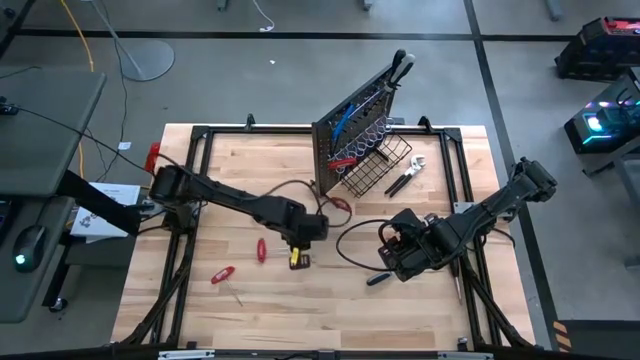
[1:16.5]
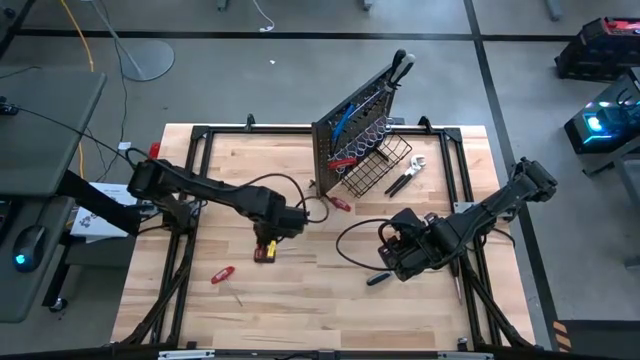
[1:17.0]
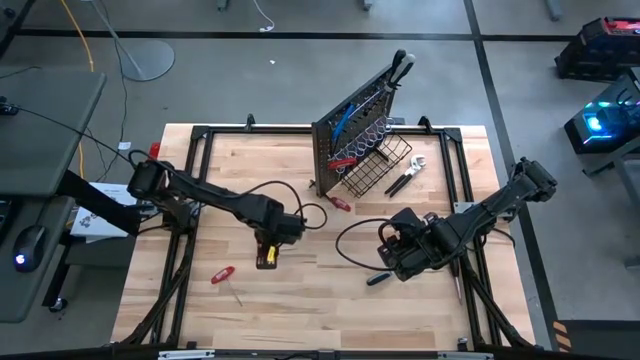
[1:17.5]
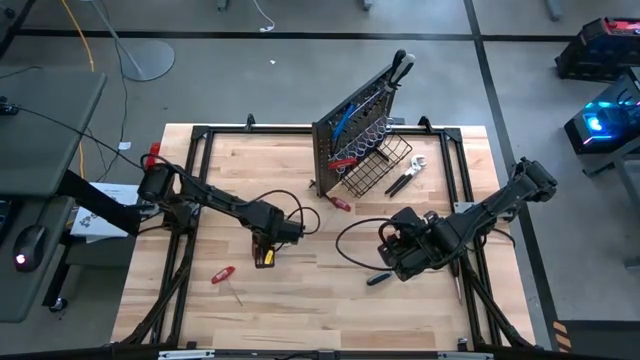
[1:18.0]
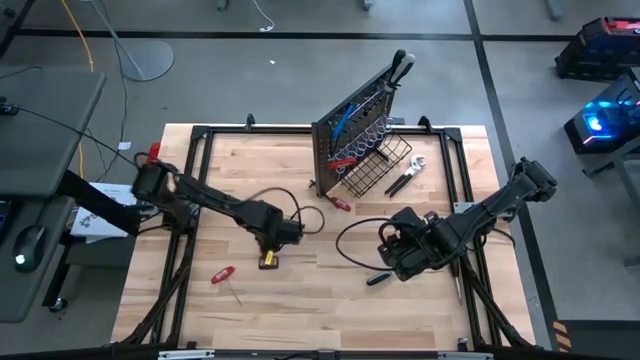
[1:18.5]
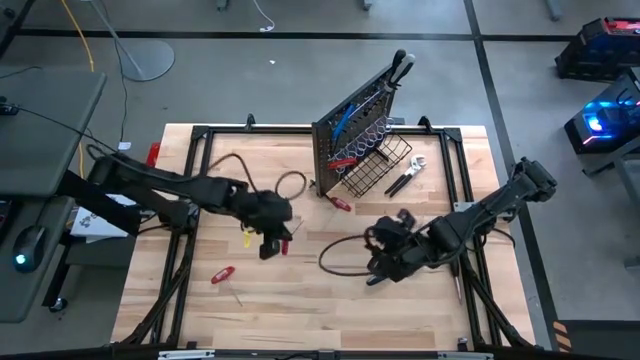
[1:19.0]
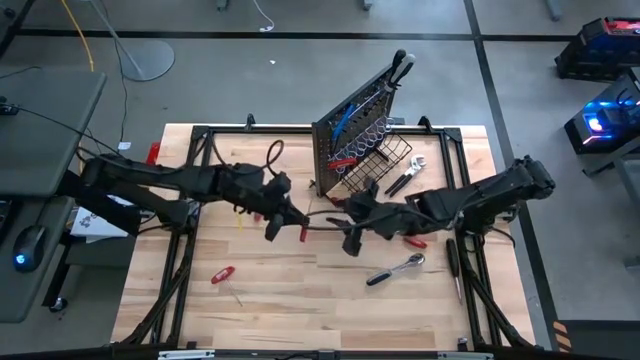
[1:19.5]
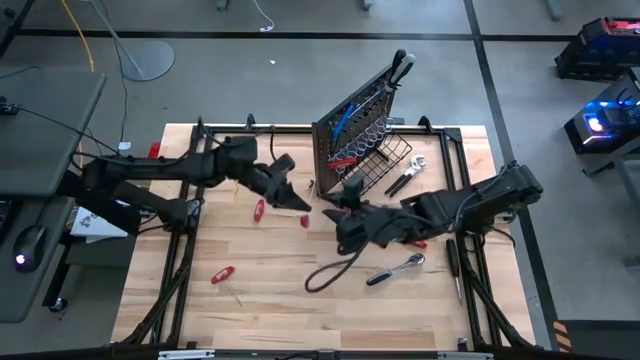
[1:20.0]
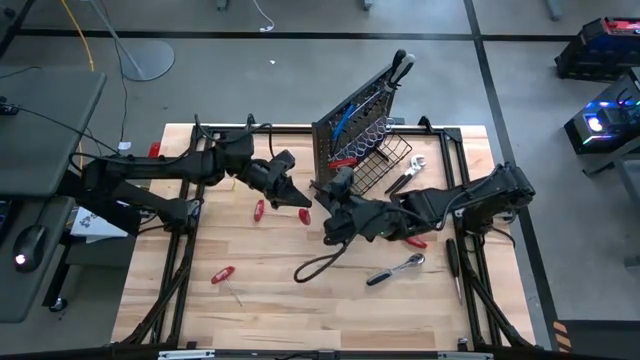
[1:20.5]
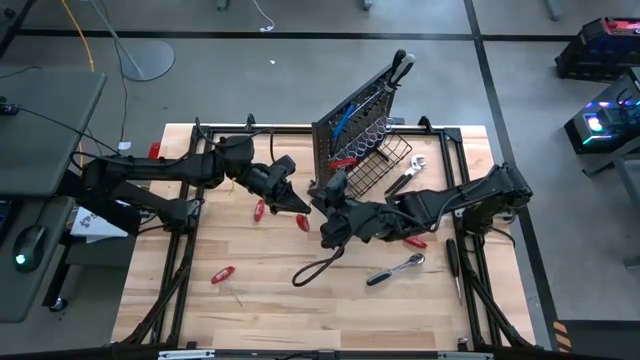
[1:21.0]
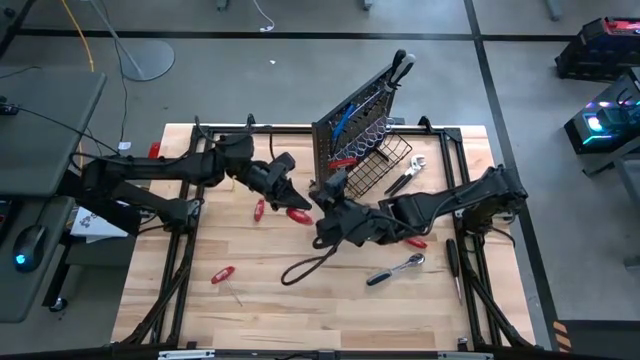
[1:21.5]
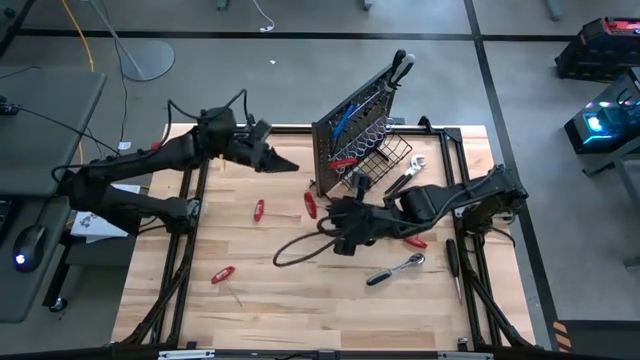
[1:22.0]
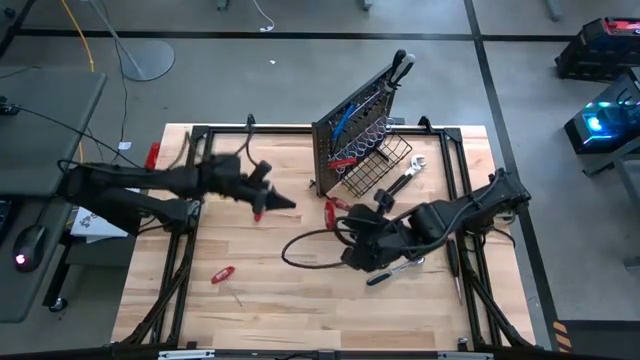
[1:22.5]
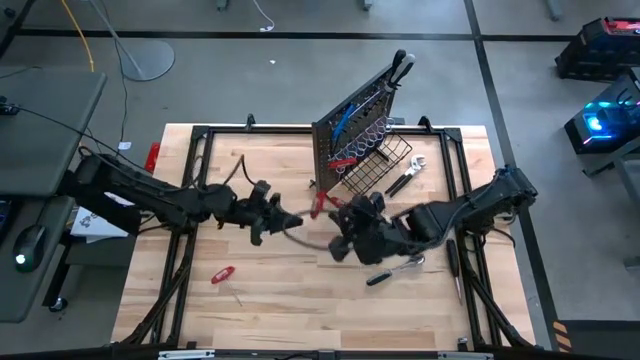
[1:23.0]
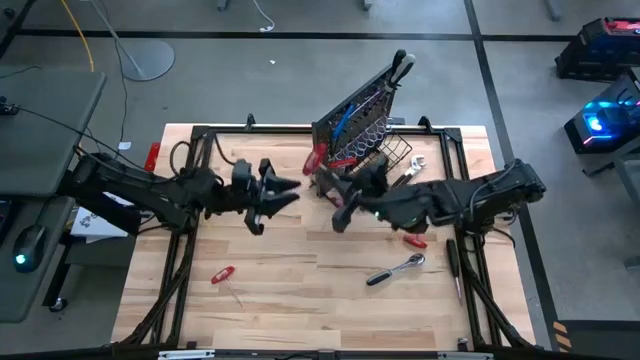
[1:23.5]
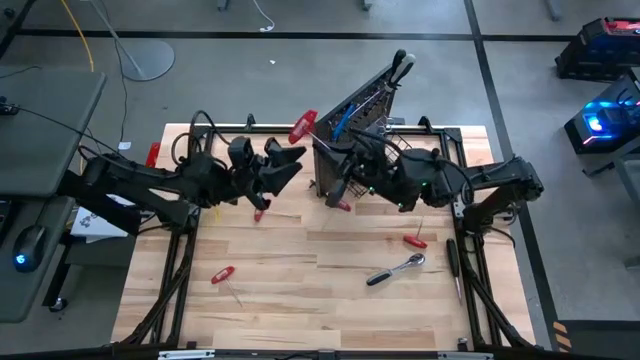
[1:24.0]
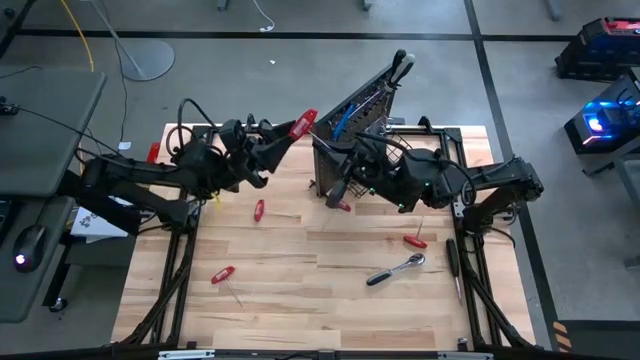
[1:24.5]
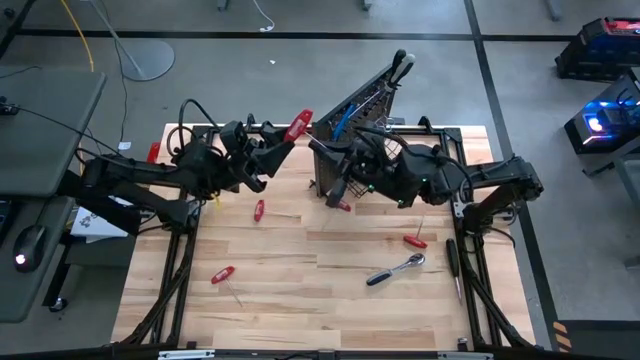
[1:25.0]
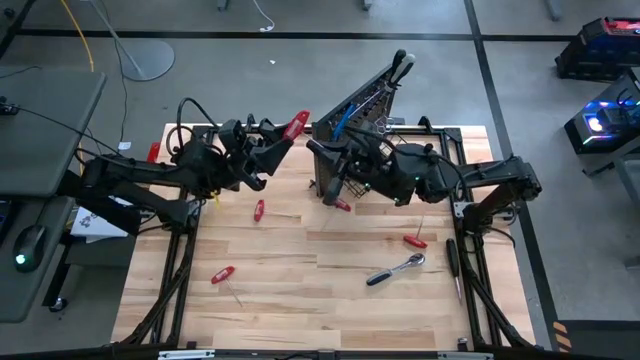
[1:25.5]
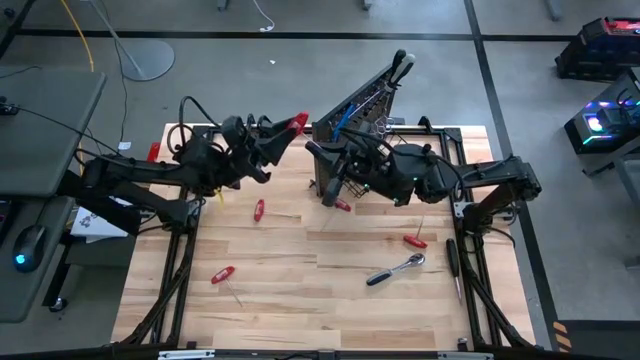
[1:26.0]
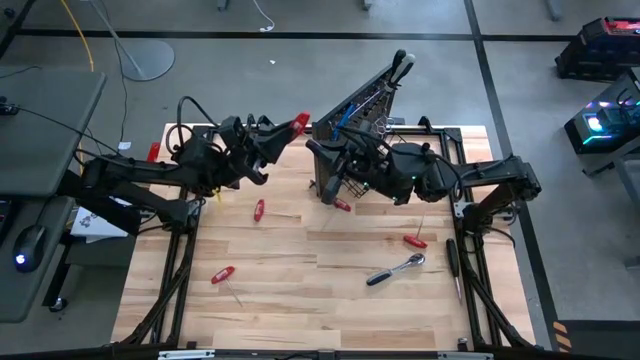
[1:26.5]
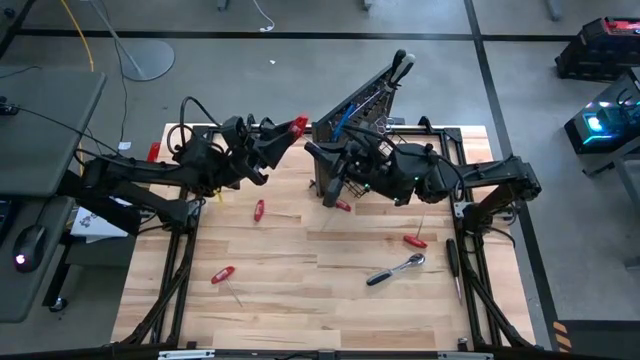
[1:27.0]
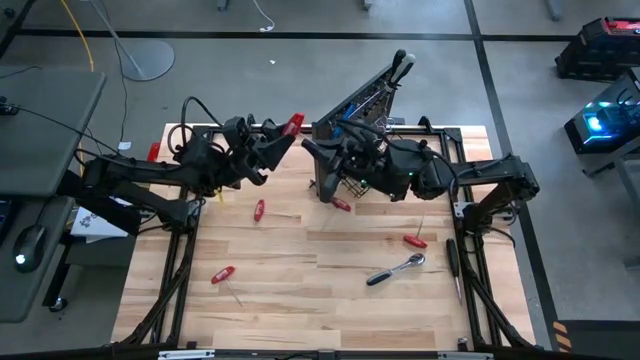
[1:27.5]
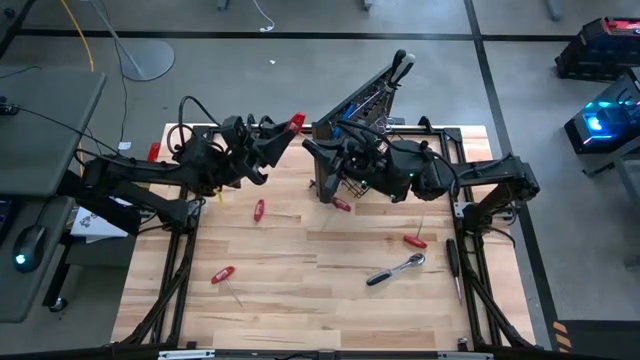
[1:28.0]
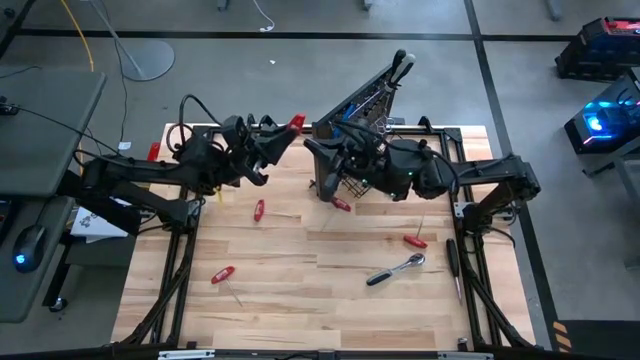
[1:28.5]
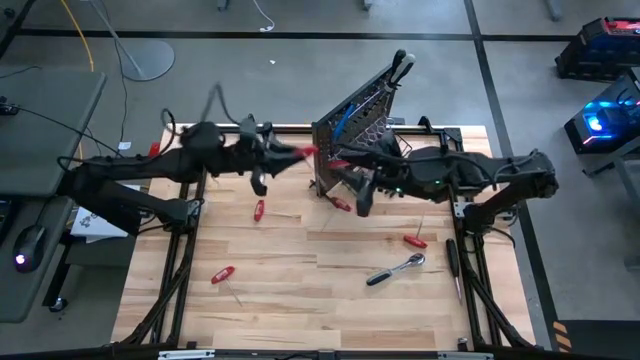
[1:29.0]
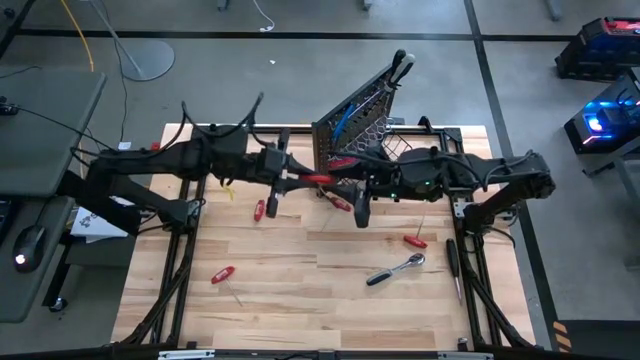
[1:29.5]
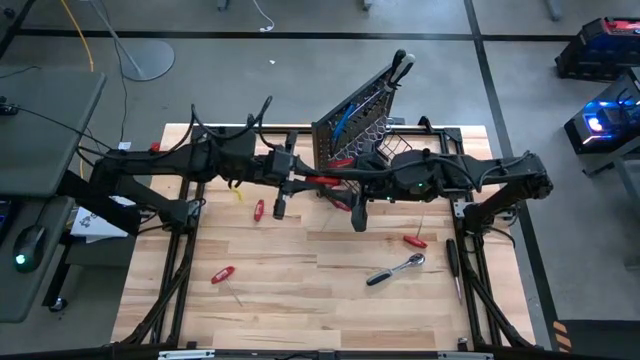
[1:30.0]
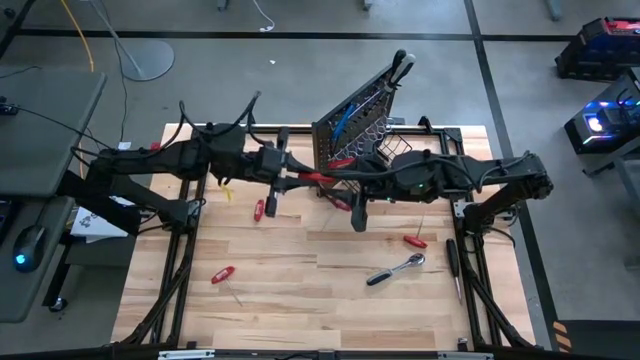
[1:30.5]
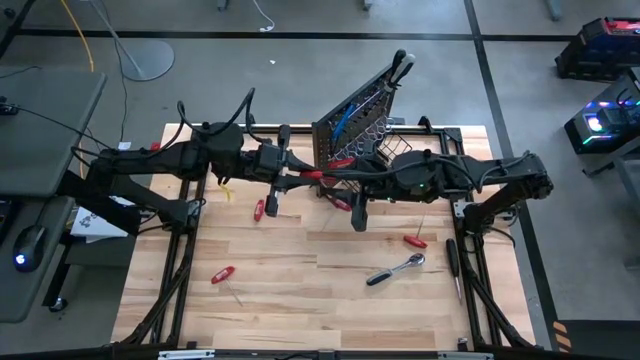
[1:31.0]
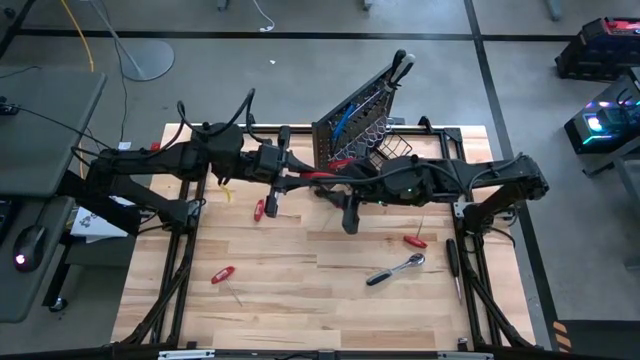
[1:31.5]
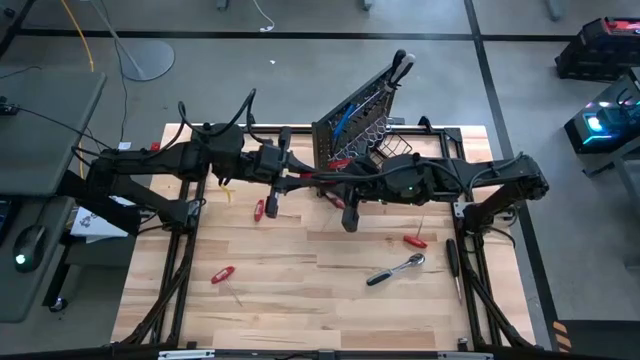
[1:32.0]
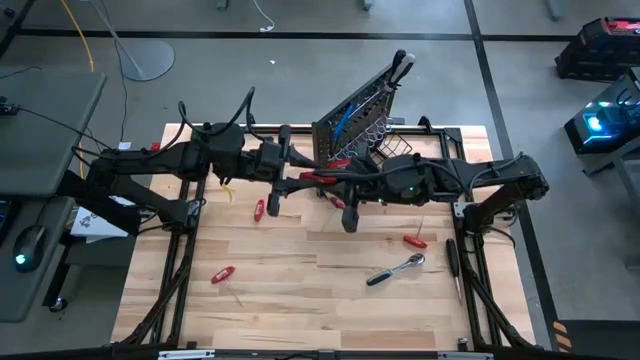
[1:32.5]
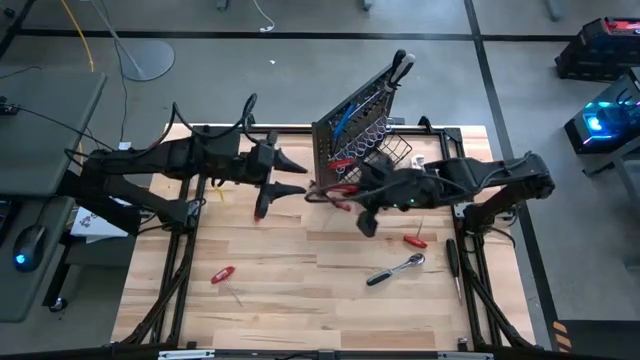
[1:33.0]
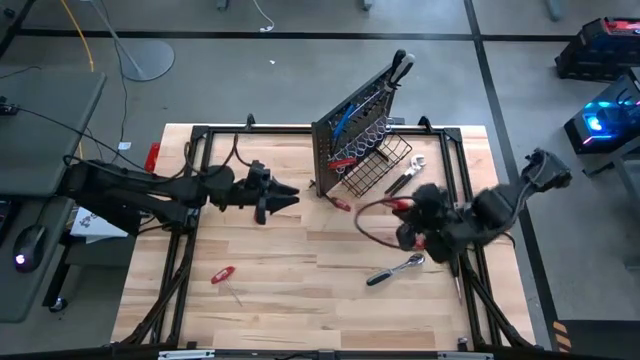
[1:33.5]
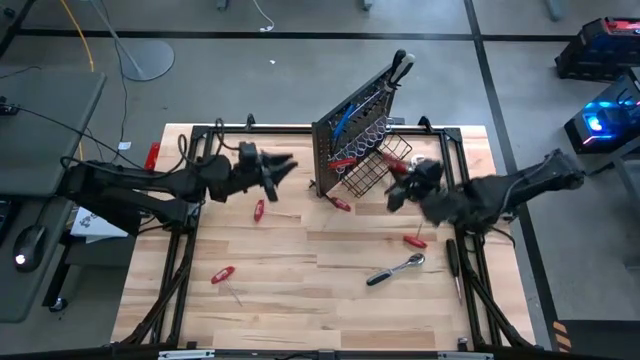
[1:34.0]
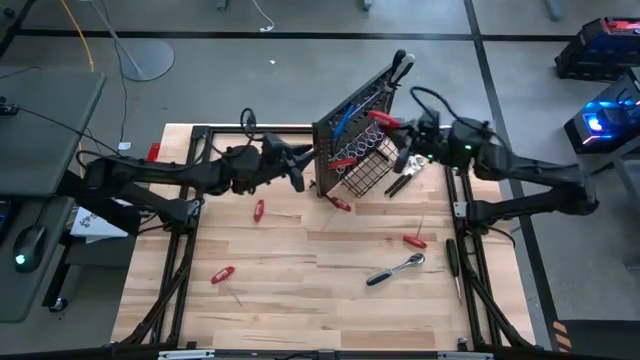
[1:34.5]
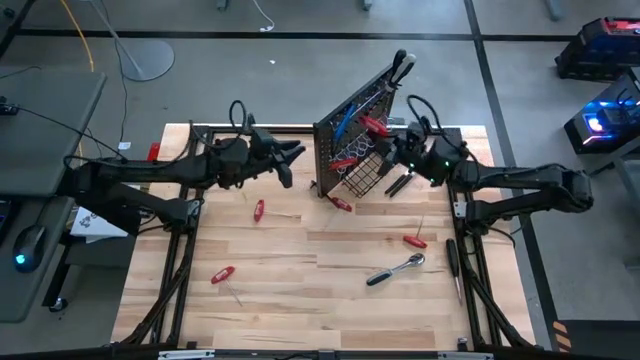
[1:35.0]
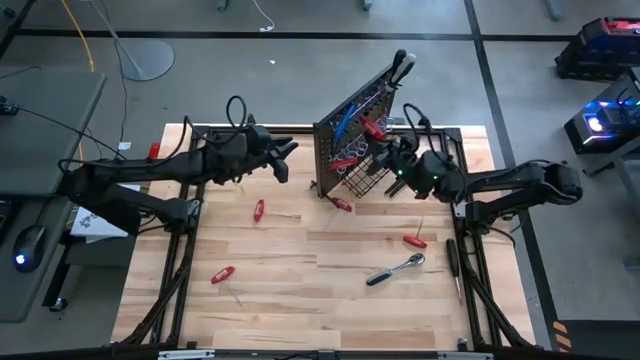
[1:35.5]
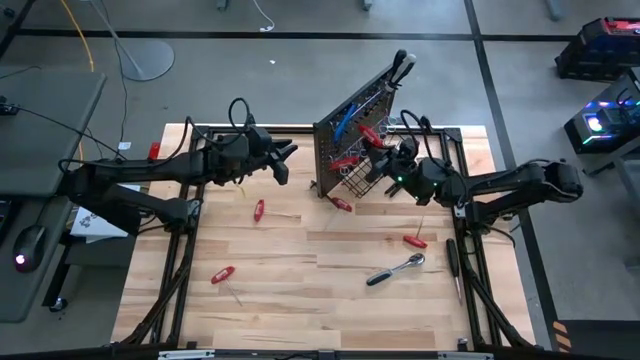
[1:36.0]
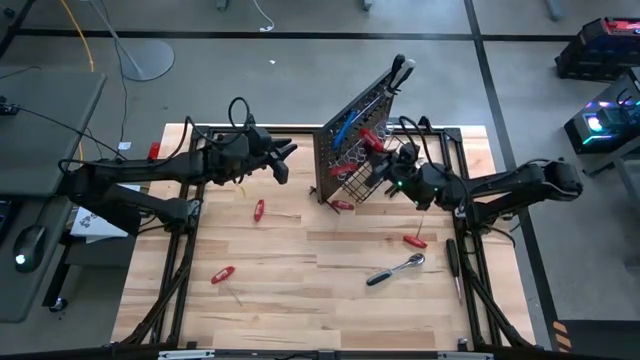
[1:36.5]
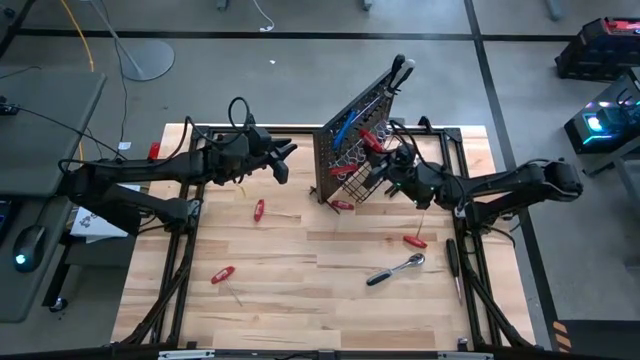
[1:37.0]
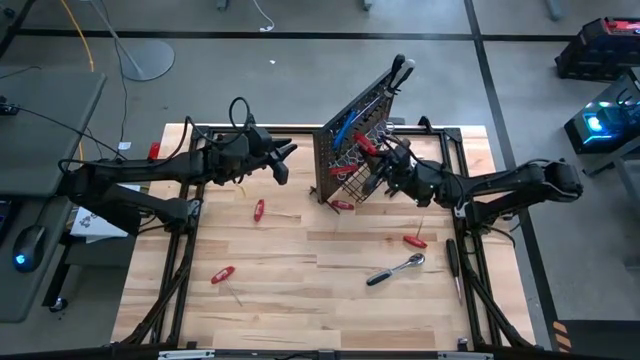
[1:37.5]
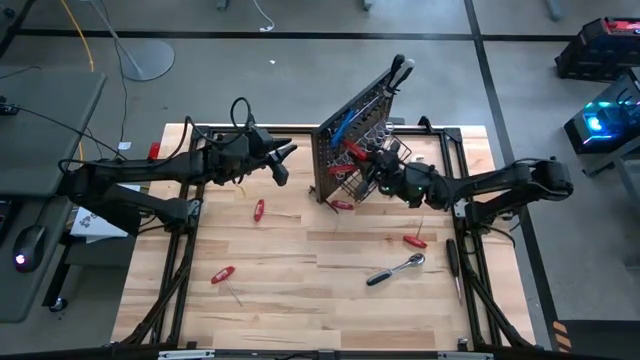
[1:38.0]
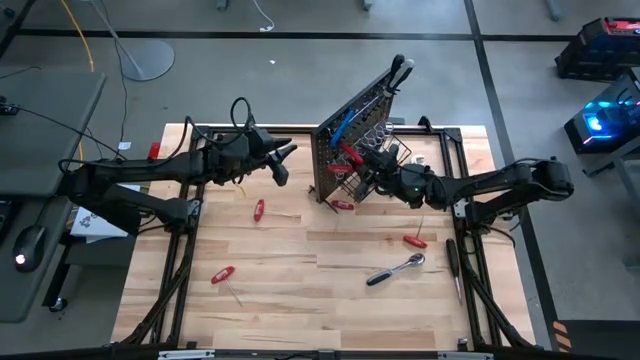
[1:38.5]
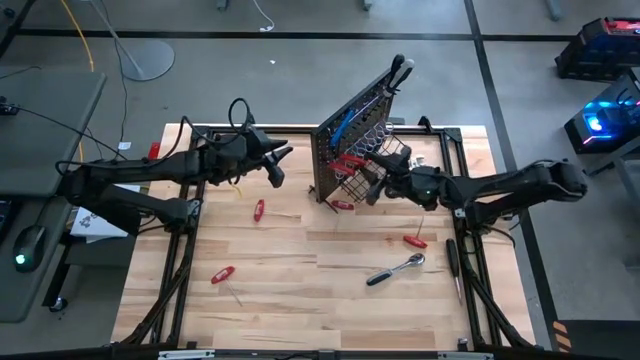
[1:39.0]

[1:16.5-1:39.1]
Task: Hang tools onto peg board
Hang the red allen wrench on the peg board
